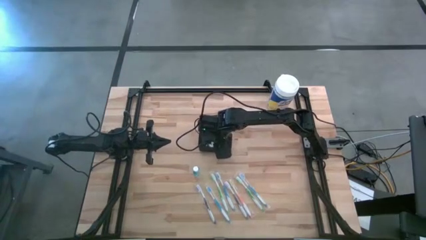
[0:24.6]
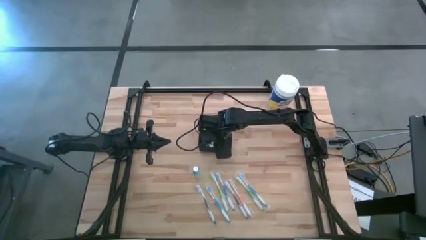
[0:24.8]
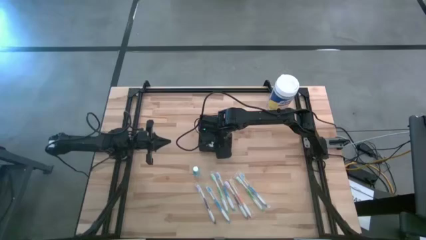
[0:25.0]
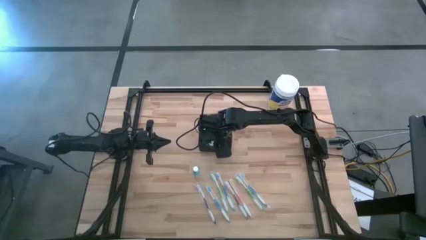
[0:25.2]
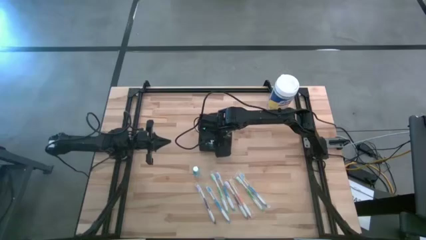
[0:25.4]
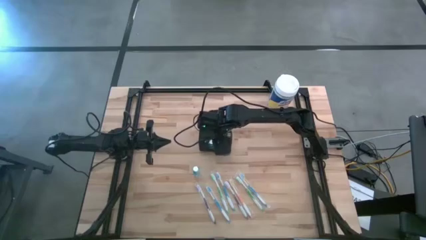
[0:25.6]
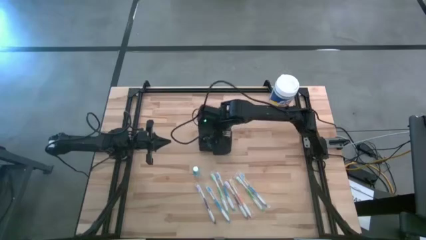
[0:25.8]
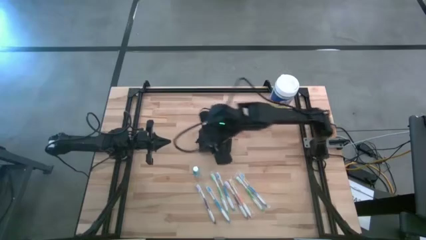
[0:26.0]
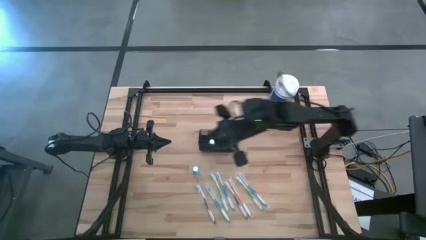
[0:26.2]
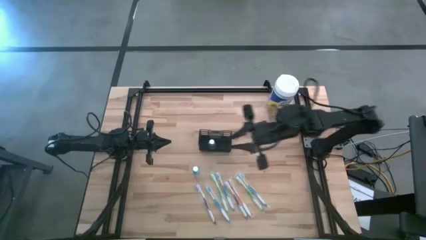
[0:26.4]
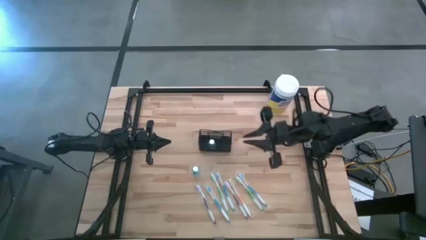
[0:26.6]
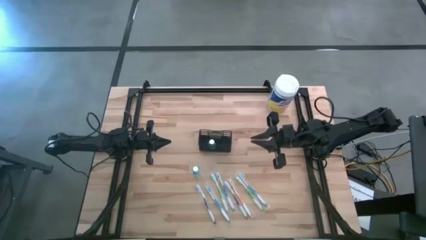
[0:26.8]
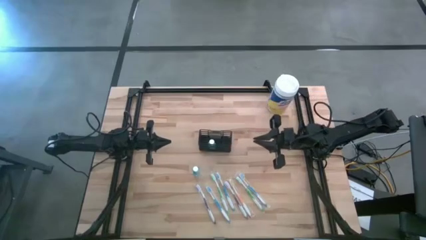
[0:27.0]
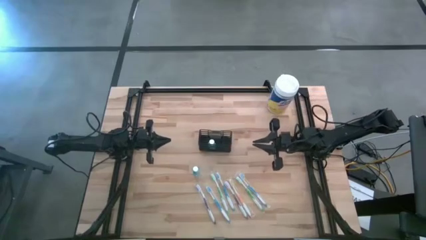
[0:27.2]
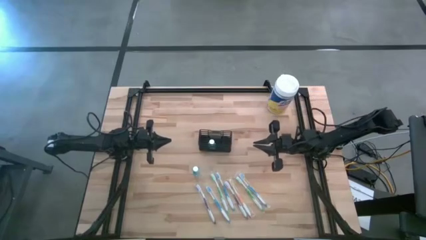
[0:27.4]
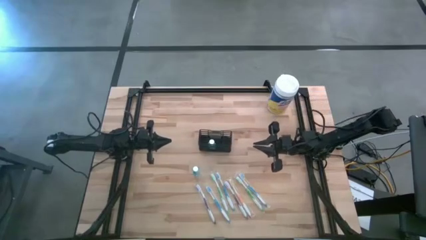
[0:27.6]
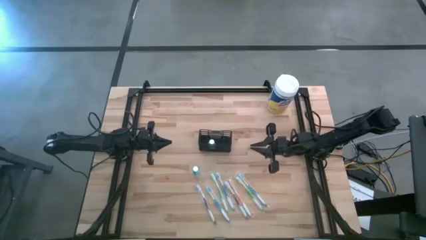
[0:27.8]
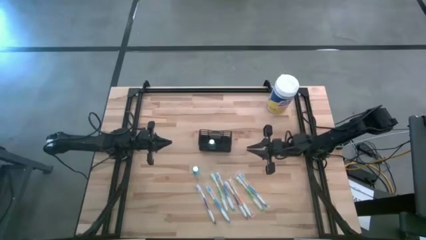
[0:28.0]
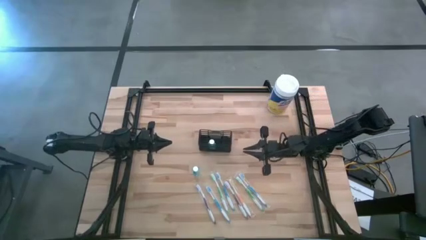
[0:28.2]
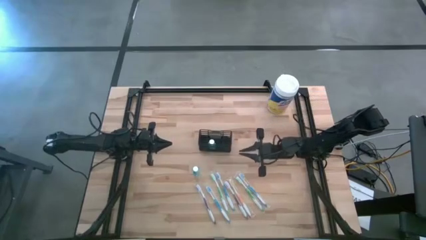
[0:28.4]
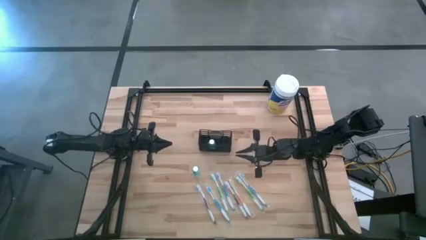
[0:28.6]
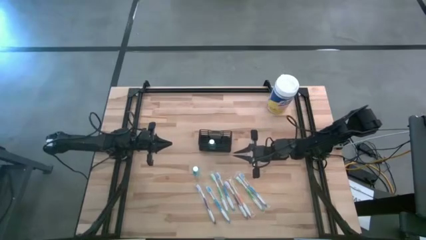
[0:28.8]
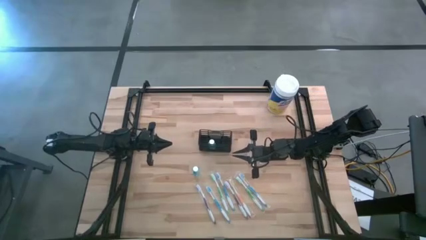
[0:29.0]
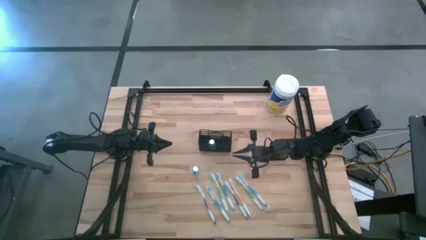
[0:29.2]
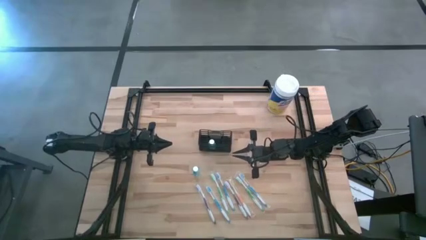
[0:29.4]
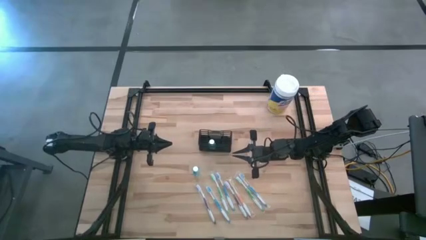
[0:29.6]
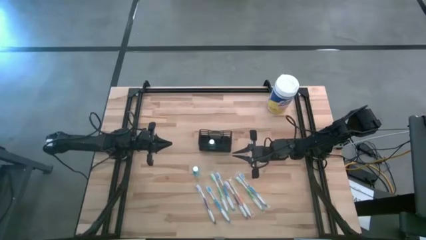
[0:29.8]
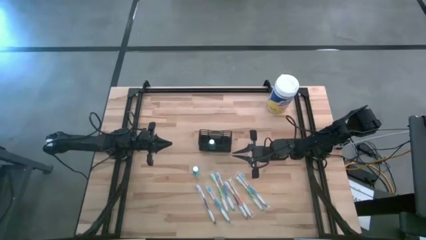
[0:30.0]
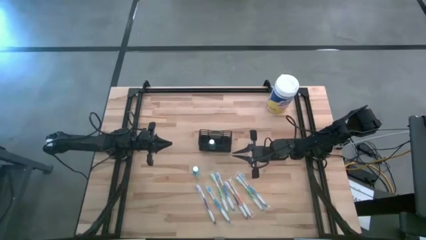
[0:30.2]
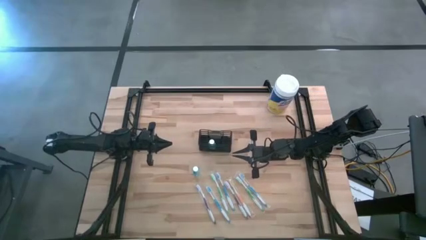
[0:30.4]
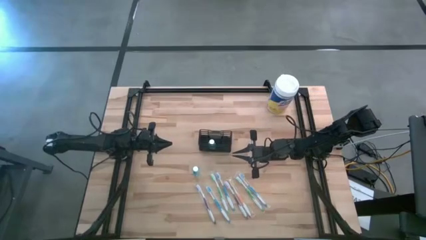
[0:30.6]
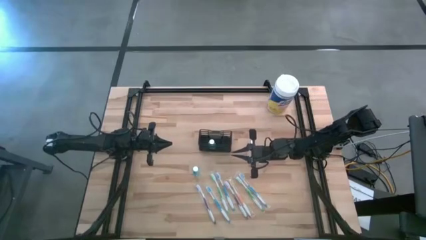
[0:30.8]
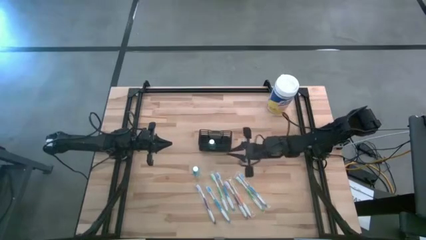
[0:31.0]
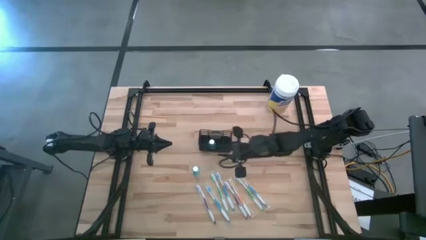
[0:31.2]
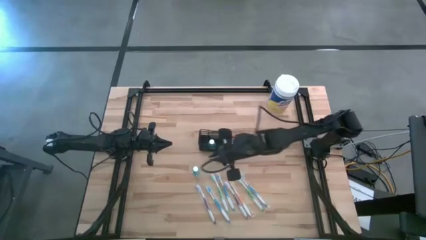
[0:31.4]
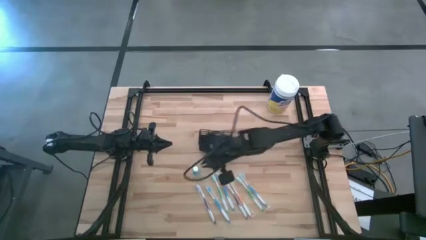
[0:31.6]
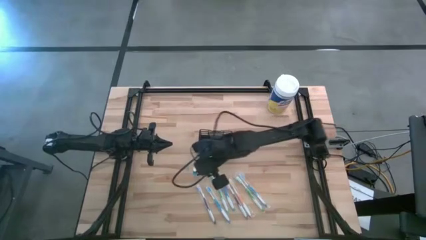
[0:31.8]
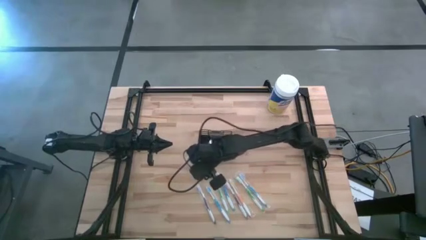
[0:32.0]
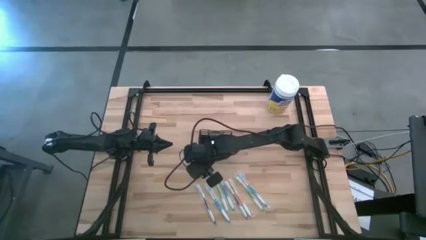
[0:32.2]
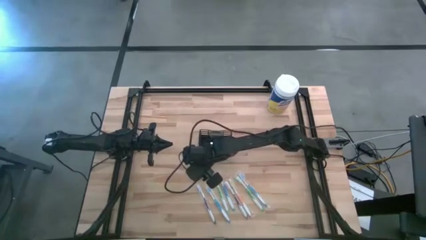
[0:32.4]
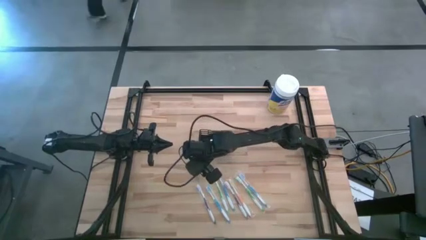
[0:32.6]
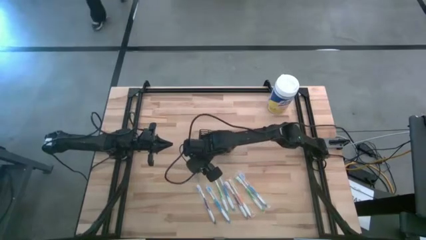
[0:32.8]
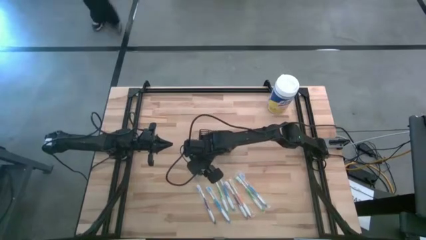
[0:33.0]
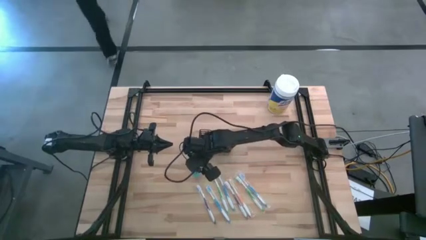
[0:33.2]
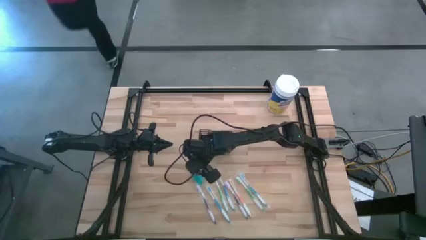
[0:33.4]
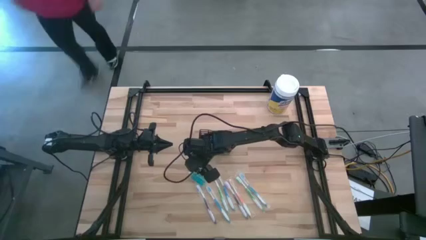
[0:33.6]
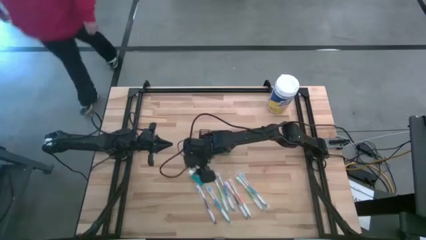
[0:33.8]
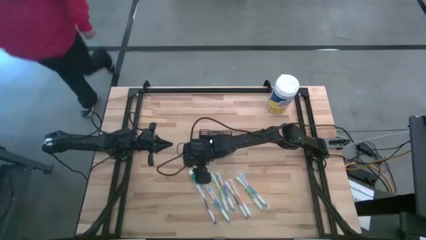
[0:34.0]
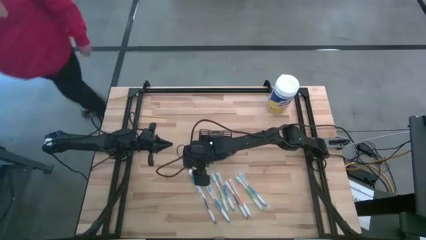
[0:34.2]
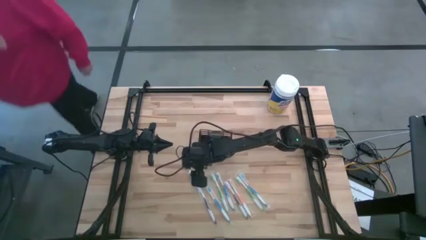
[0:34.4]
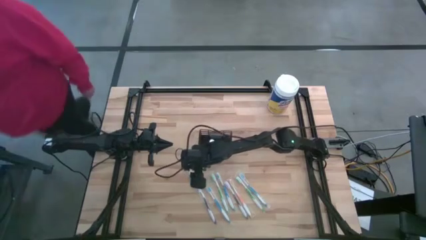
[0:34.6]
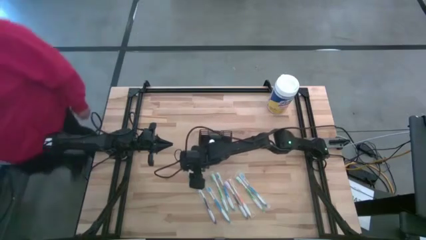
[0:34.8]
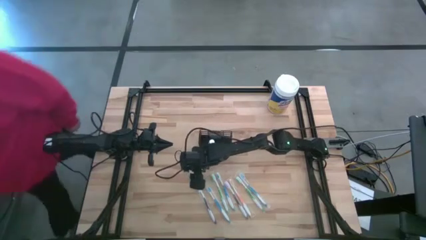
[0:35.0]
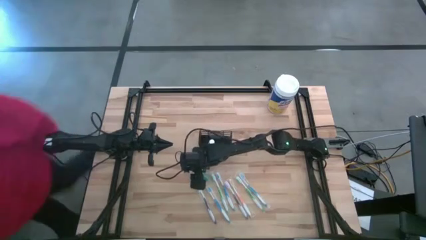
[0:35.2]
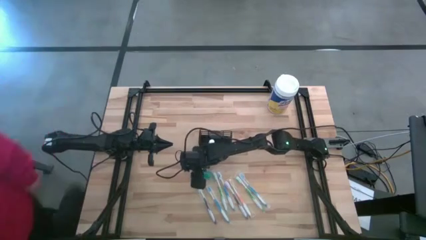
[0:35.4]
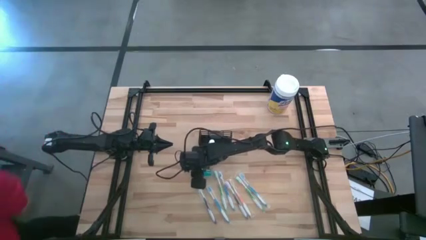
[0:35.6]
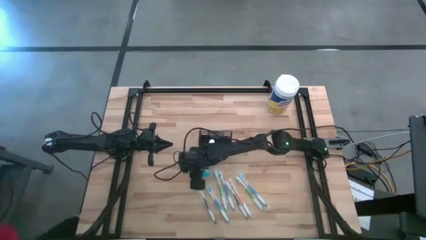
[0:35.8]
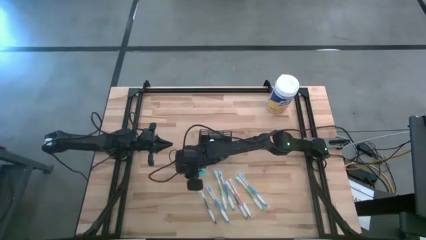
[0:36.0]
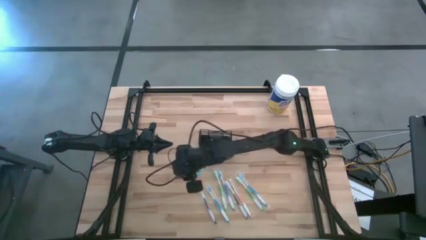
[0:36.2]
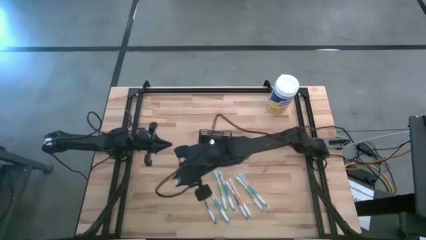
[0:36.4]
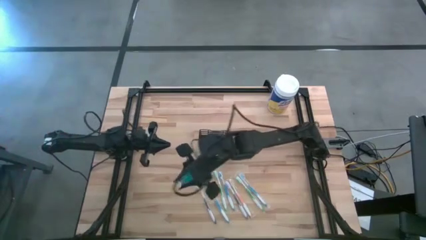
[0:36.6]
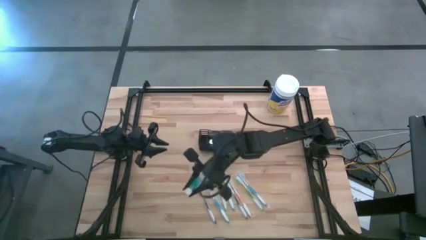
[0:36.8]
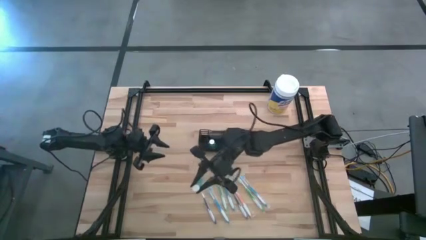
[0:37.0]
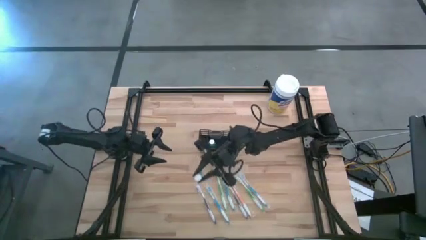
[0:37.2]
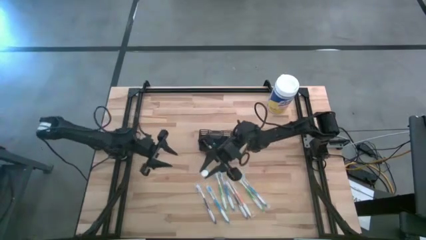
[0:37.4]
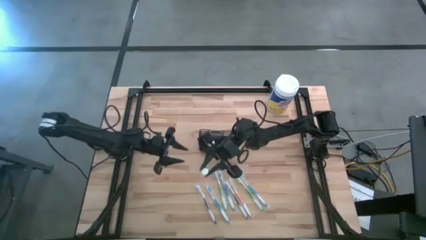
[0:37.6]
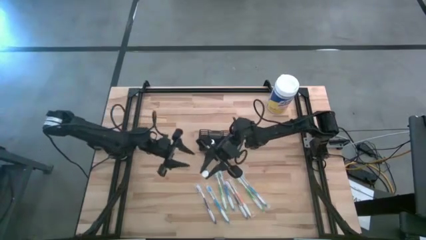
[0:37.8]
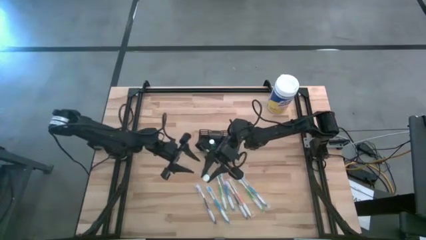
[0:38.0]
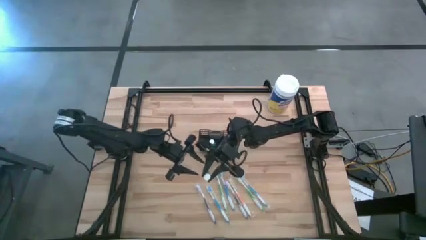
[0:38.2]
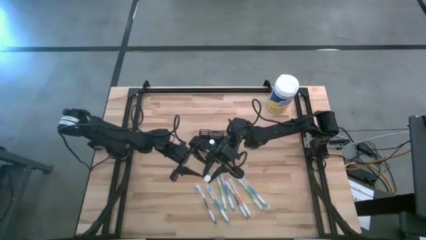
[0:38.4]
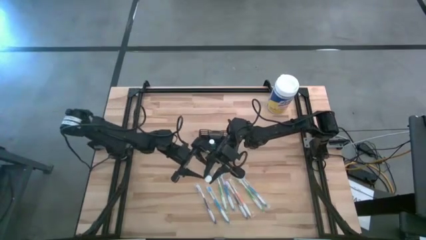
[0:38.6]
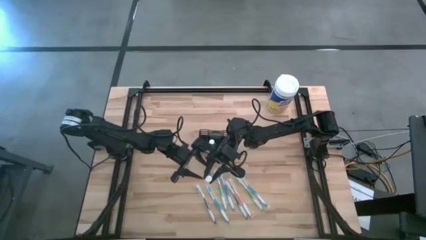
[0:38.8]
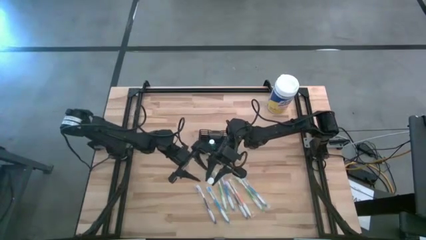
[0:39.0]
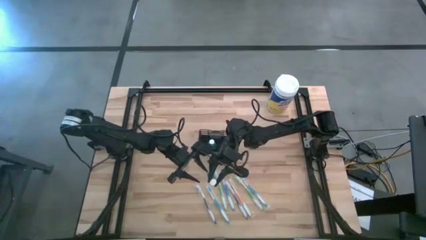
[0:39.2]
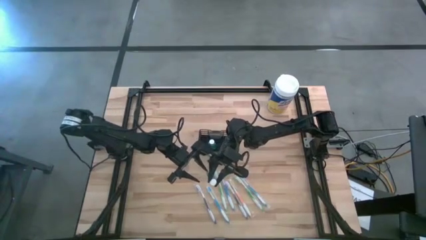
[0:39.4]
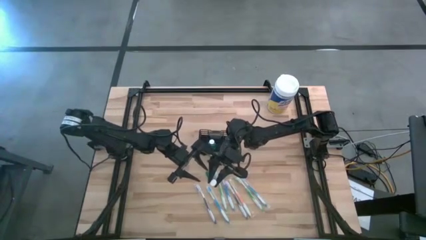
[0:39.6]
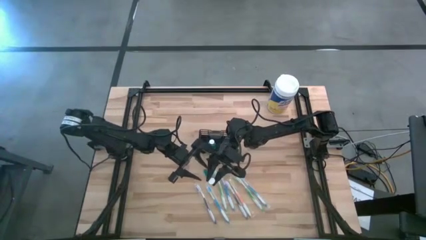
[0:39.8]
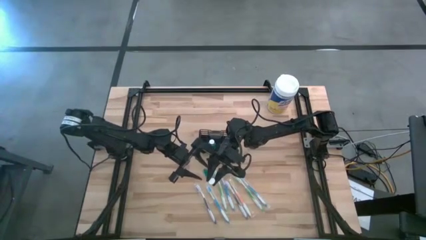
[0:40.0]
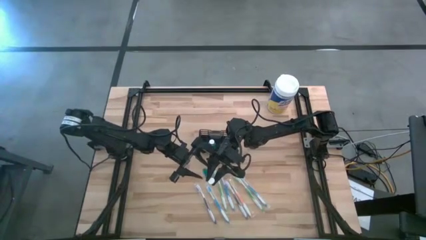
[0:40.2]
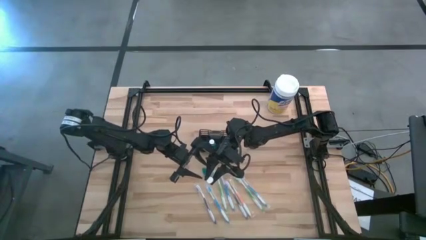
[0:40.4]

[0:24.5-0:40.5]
Task: Pick & Place toothbrushing station
Put the blue mouthwash bottle into the black wire organizer
